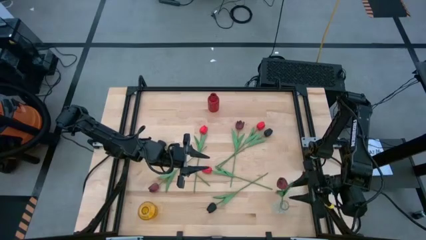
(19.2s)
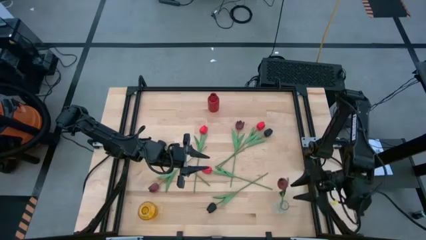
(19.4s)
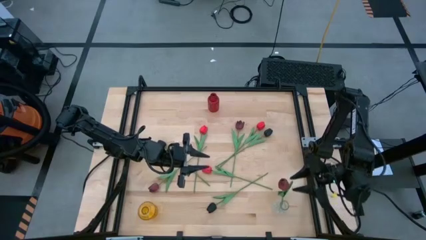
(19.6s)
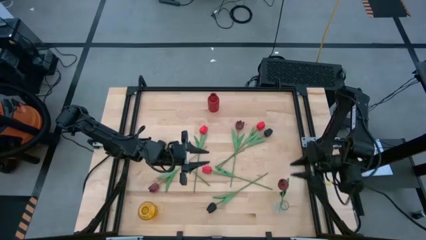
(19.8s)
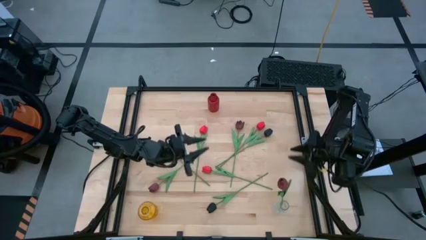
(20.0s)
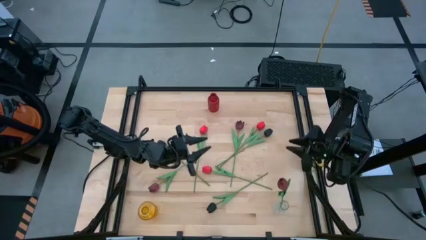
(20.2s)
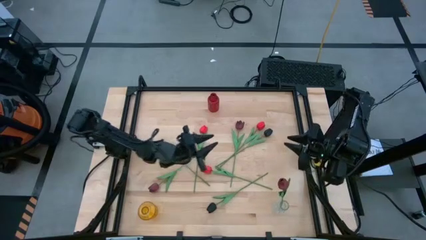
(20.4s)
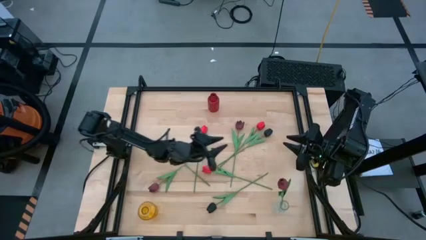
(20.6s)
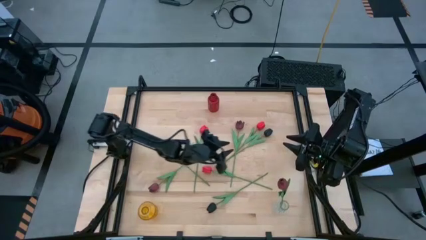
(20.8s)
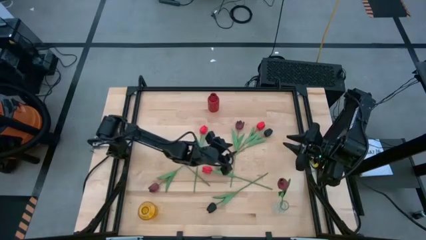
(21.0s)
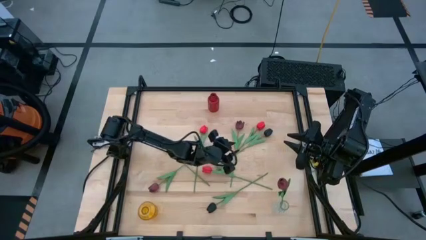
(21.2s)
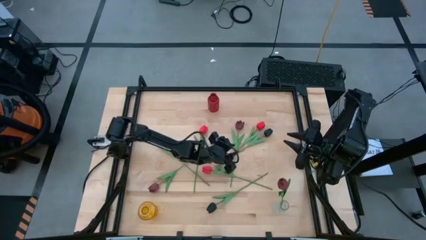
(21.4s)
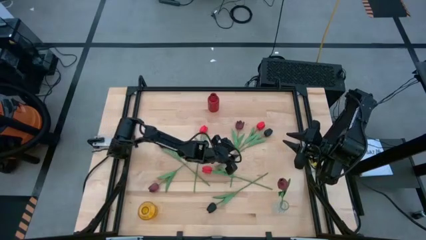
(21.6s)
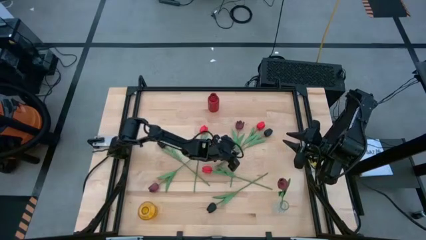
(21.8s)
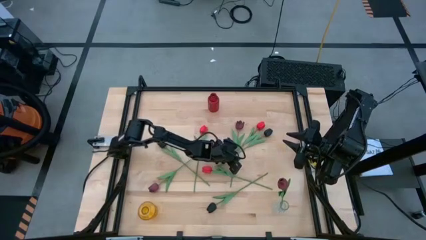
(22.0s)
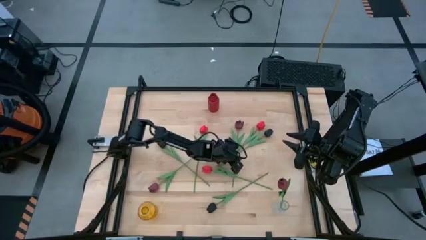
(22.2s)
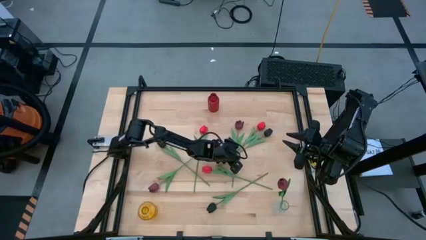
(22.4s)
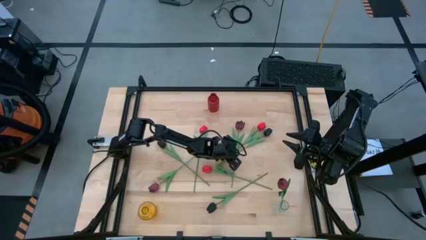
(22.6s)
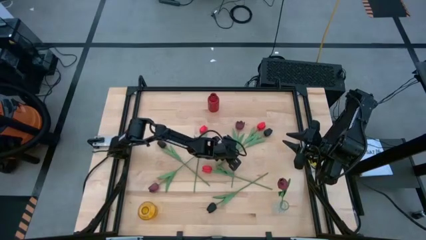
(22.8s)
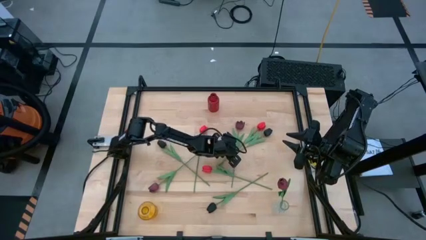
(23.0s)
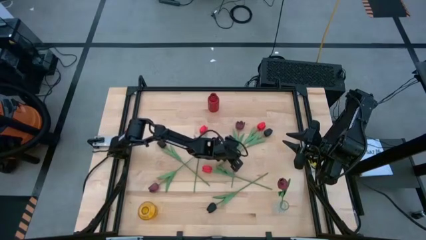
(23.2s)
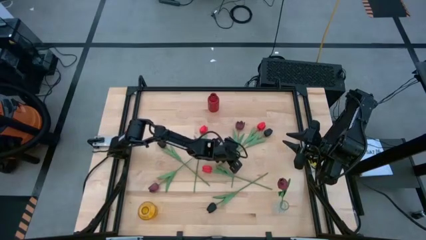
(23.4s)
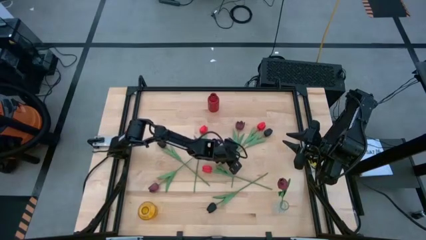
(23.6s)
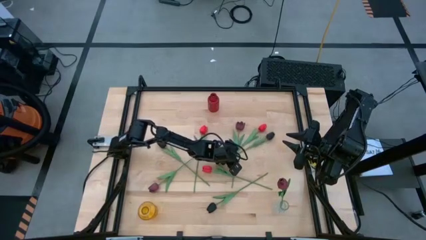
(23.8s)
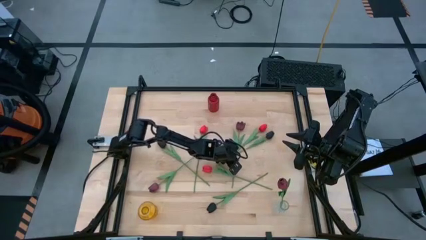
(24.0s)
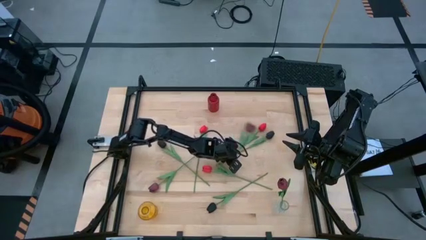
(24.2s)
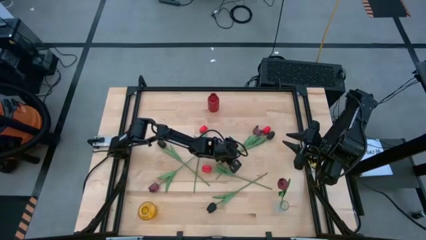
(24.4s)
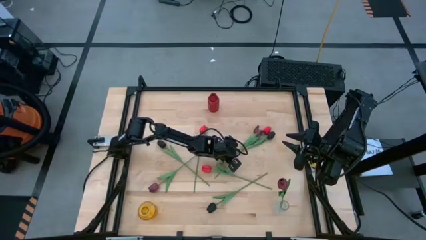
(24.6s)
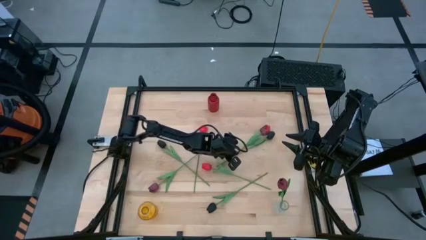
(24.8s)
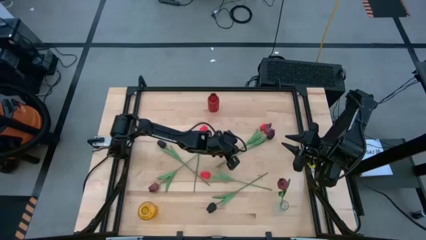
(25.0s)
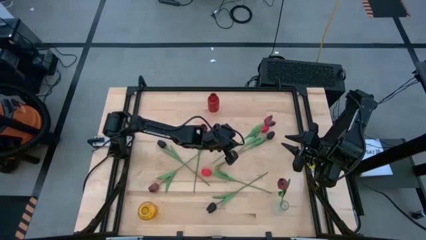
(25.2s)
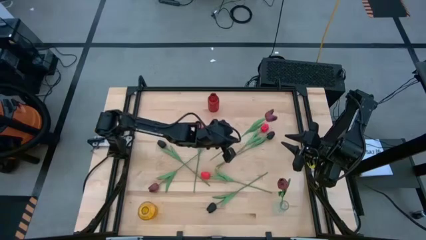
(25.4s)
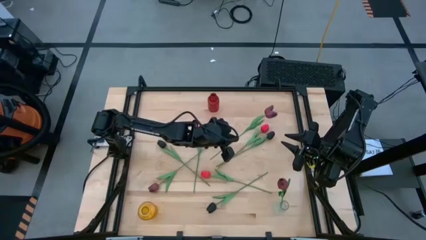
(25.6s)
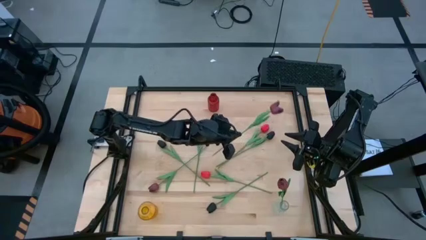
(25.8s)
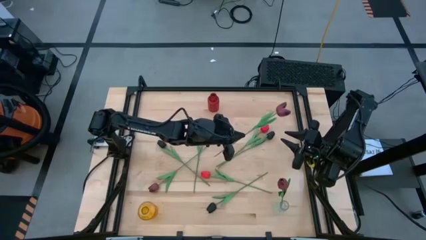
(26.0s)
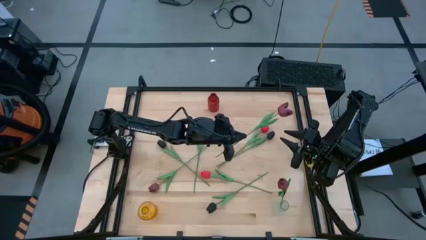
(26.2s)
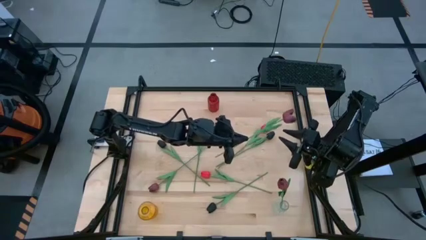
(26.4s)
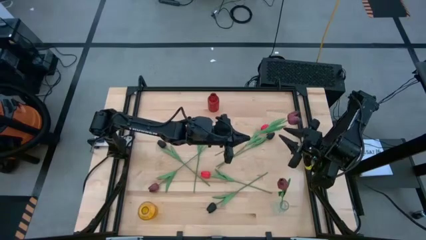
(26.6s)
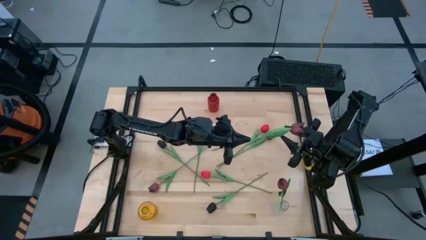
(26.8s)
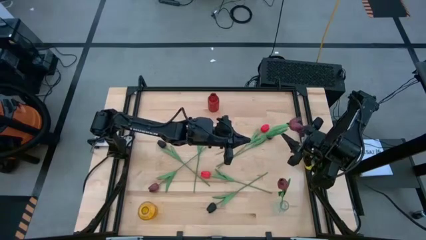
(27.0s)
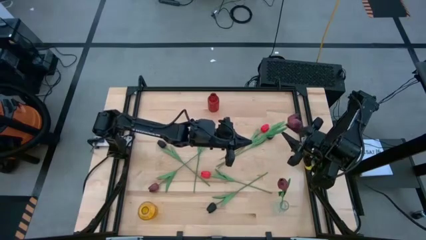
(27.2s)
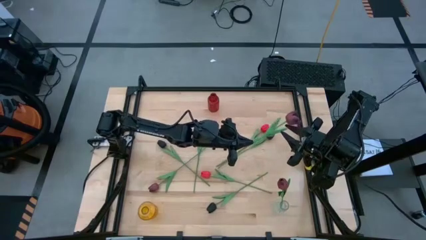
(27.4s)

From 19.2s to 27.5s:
Task: Sort flowers into vase by color
Put the top dark red flower into the transparent vase

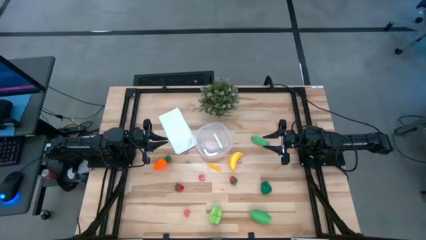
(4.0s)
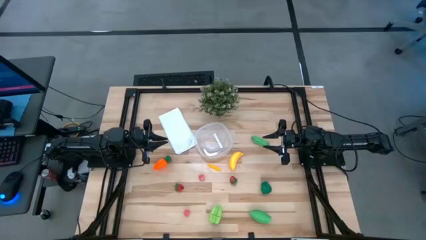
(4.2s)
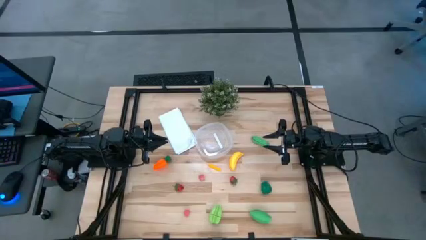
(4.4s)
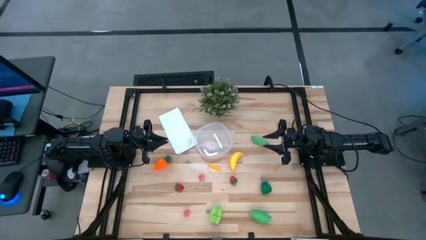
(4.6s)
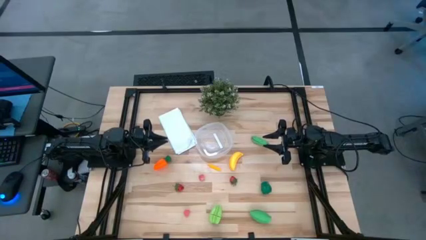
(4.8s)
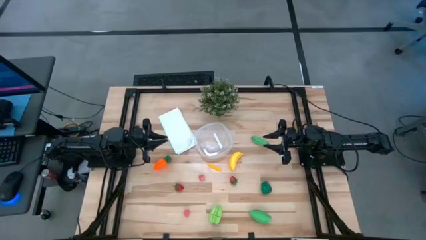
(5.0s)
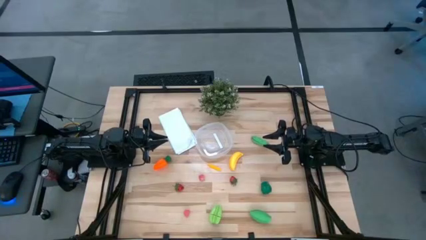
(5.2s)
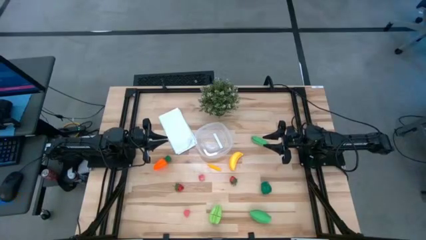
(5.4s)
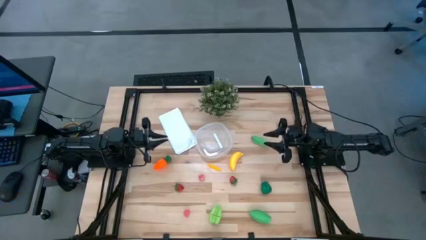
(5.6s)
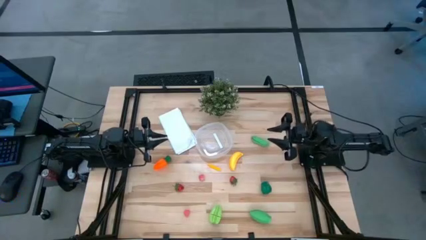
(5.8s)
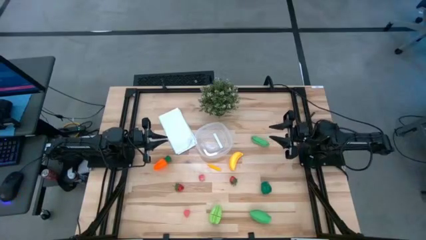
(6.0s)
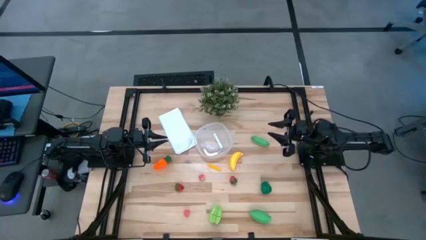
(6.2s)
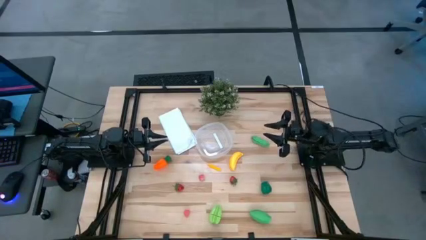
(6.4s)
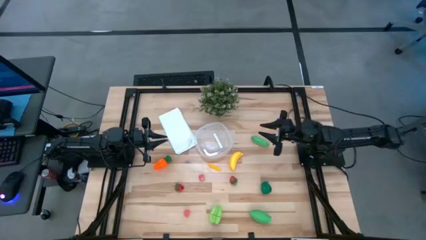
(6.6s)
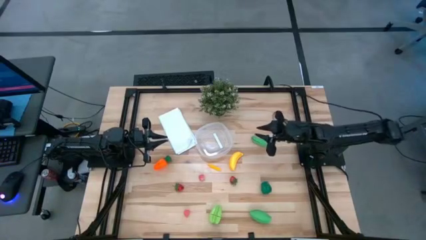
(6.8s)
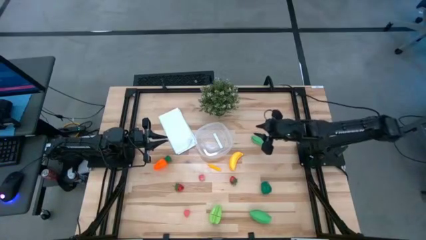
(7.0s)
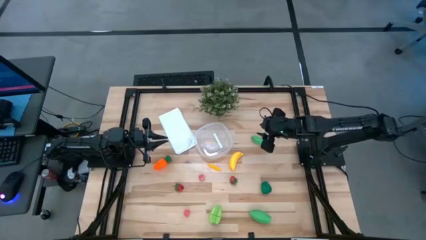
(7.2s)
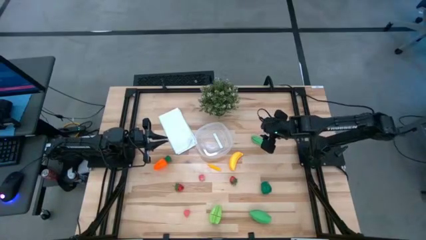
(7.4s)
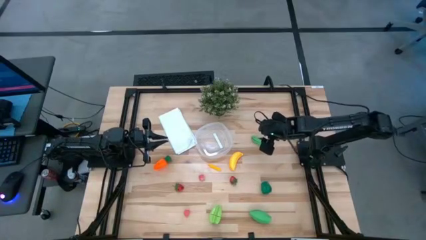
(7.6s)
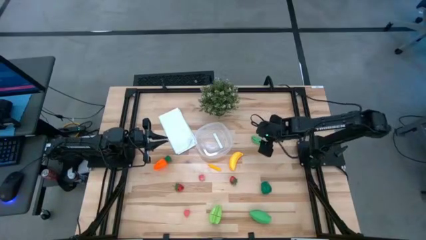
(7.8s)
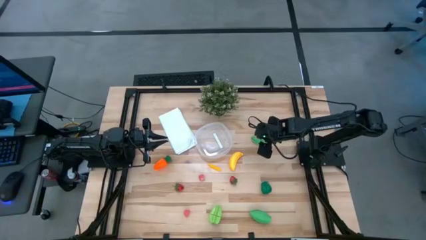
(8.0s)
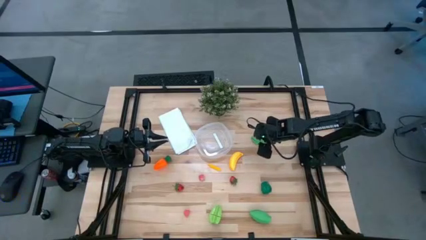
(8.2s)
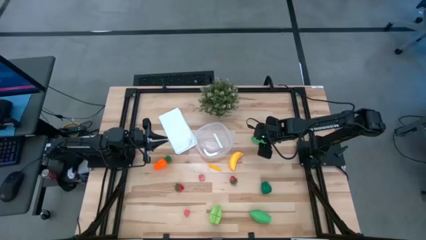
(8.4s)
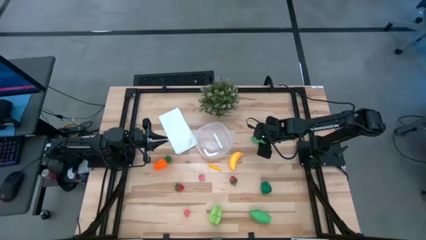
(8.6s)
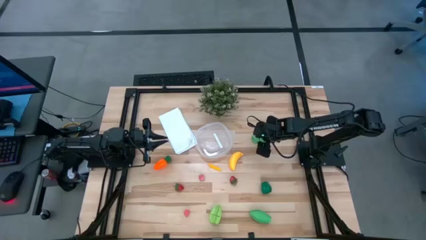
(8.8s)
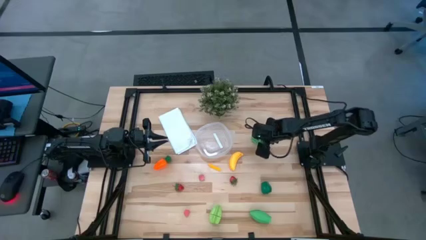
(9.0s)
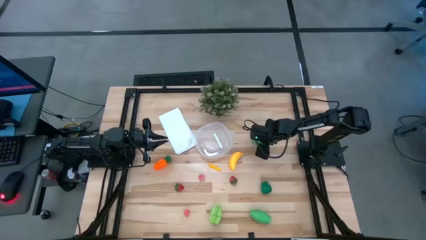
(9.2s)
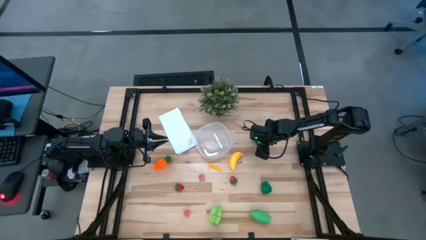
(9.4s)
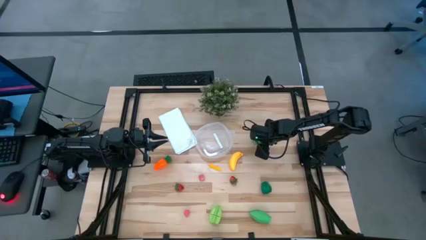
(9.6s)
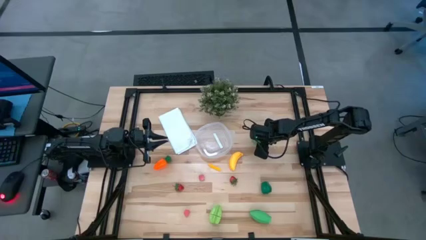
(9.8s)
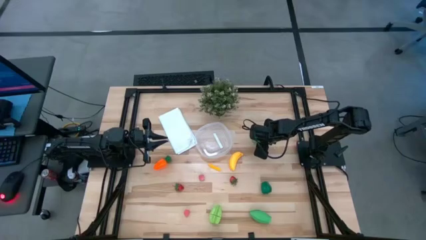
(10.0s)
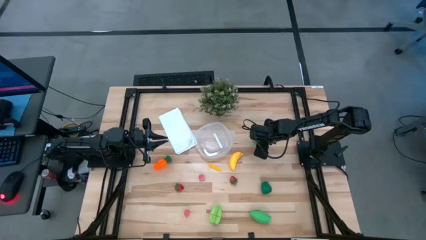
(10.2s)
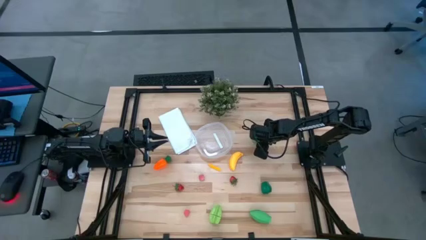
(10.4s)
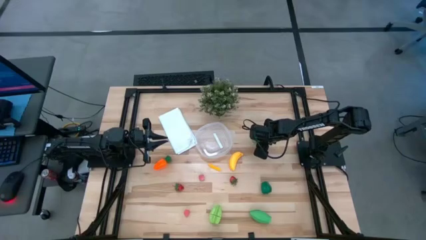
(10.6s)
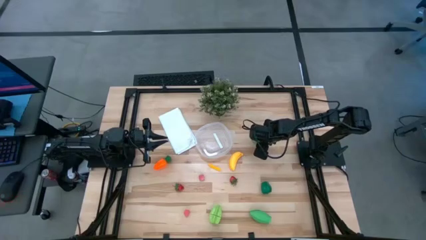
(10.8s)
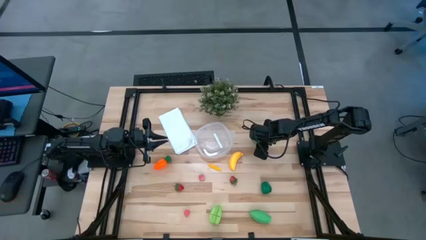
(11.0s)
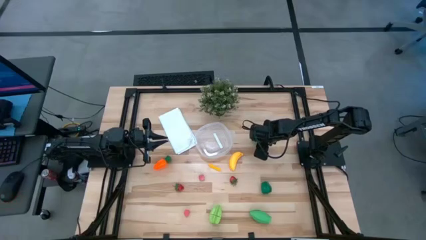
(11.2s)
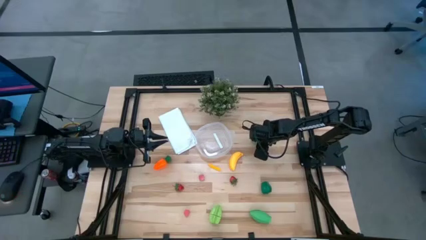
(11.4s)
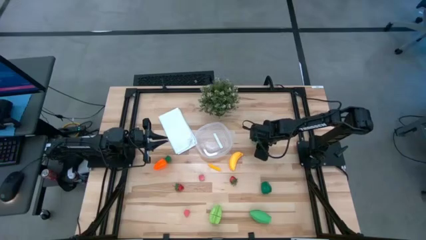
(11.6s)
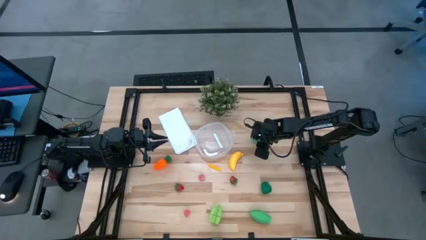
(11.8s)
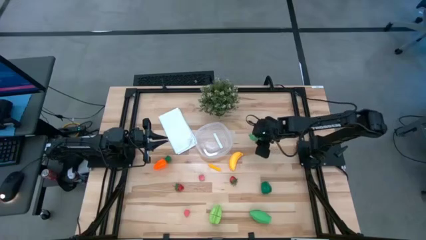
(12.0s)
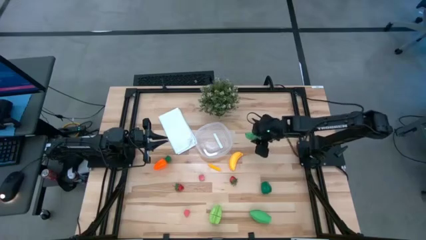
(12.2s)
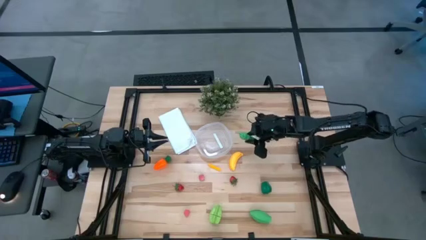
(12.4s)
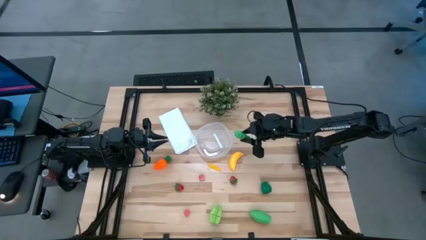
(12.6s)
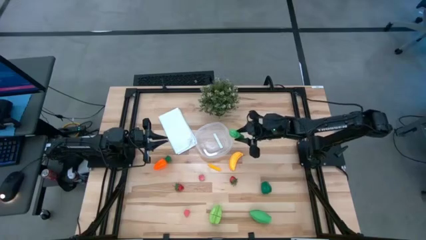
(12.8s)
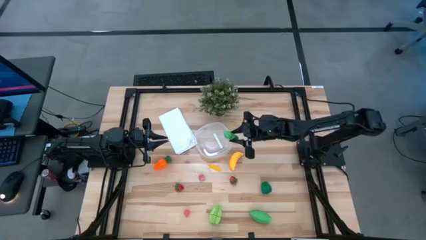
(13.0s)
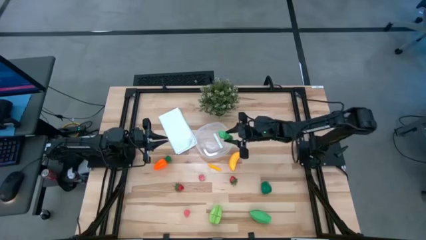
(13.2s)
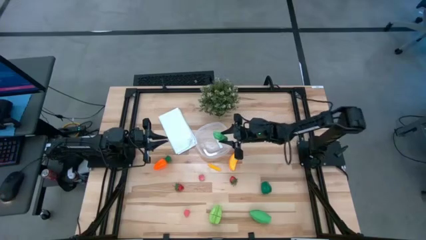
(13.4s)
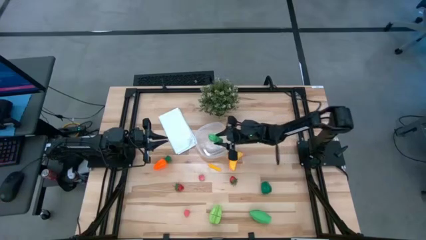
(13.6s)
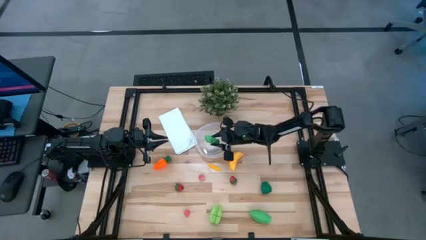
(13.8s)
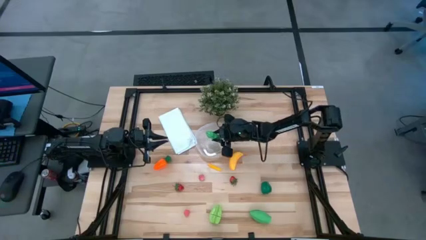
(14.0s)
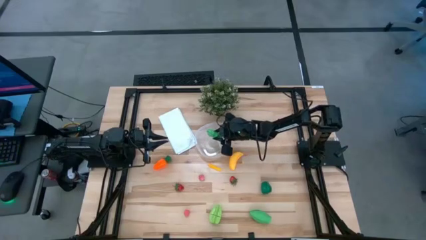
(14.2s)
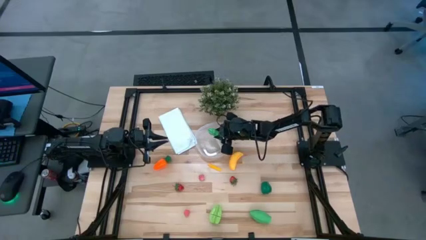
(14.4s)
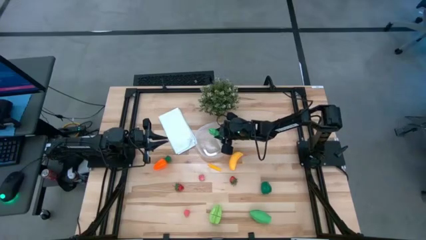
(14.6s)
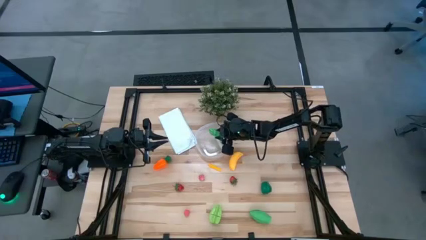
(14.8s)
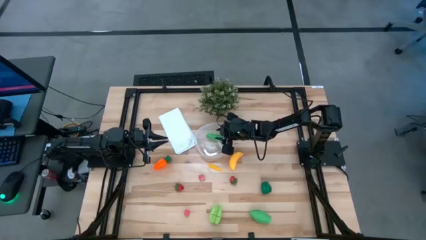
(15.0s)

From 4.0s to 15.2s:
Task: Pick and placing Produce into tupperware
Put the green pea into the transparent bin
